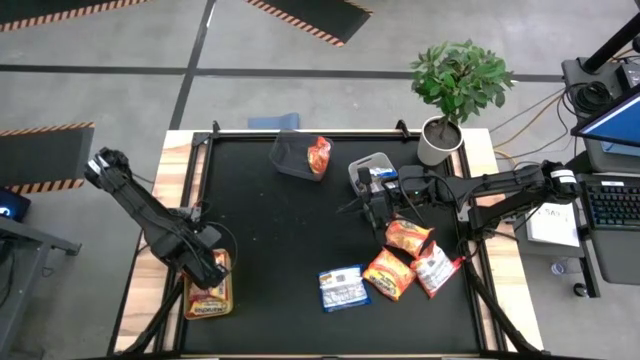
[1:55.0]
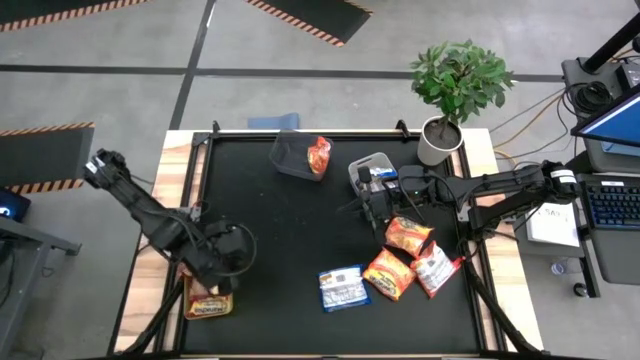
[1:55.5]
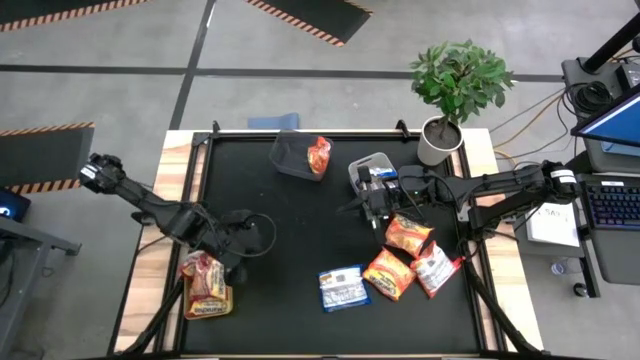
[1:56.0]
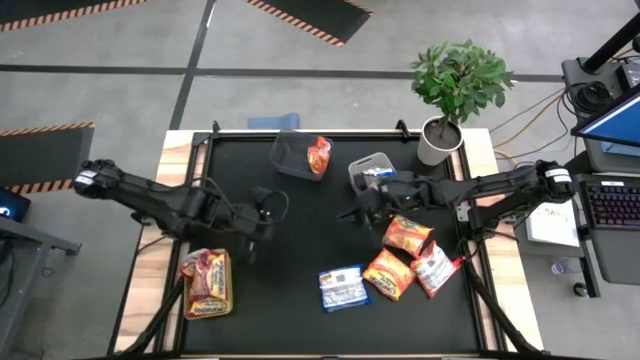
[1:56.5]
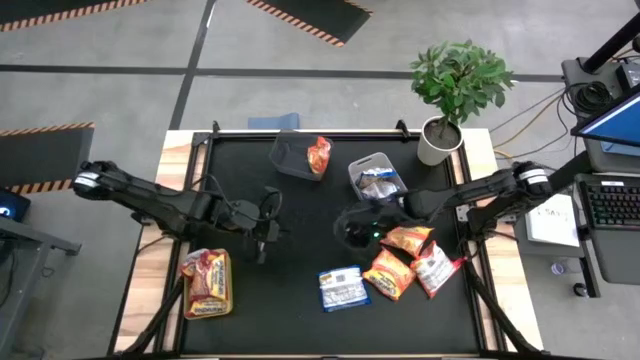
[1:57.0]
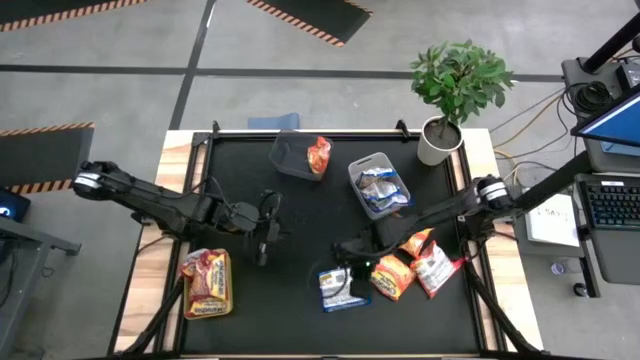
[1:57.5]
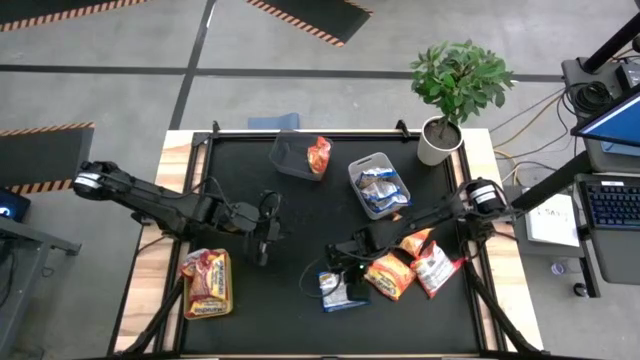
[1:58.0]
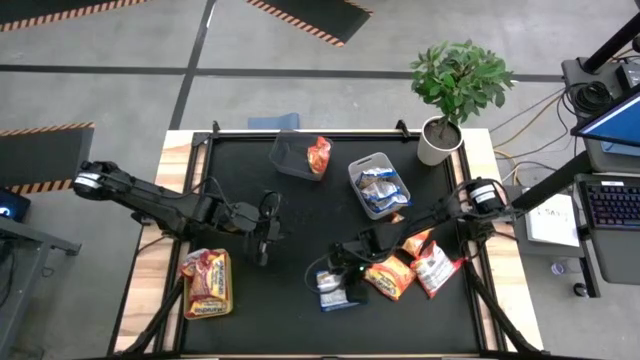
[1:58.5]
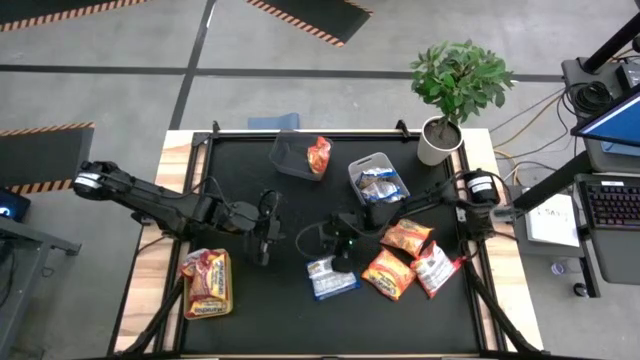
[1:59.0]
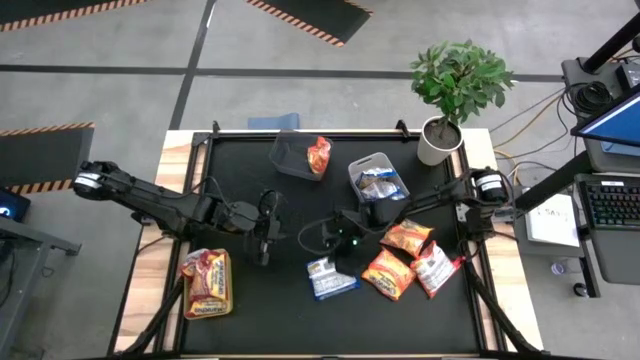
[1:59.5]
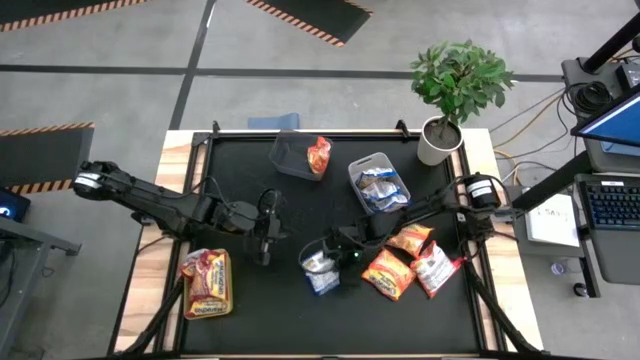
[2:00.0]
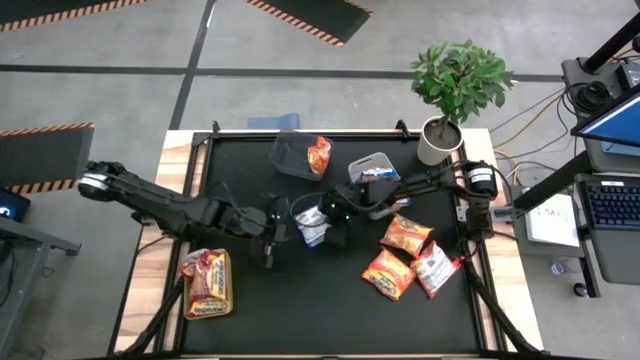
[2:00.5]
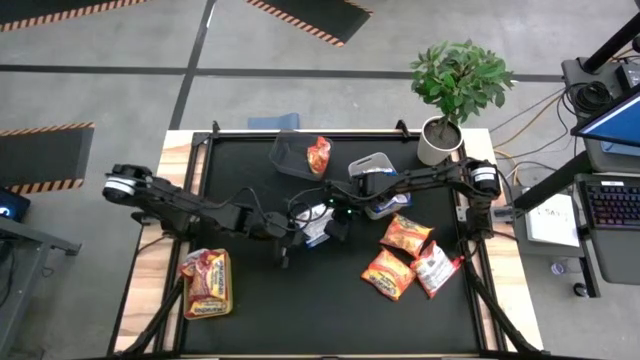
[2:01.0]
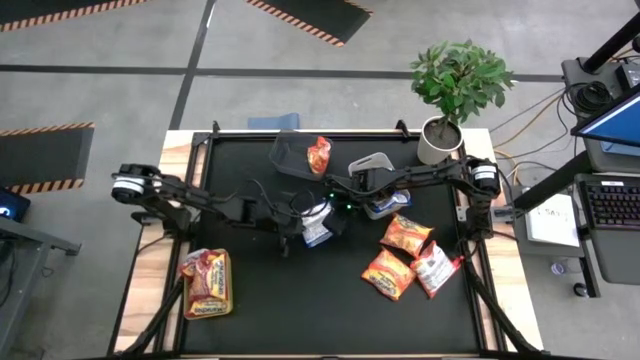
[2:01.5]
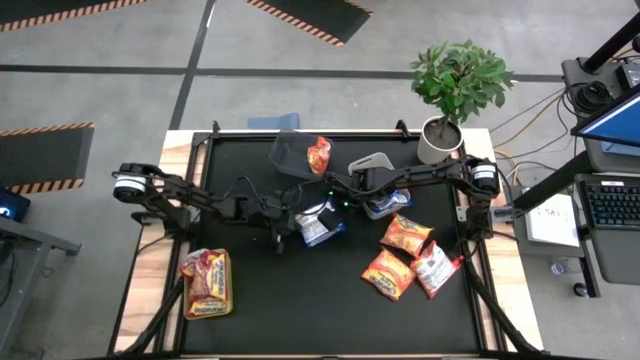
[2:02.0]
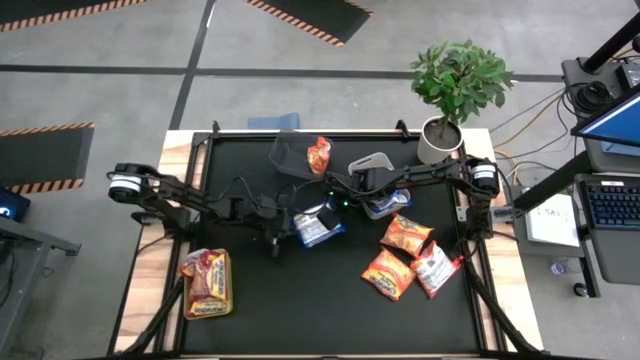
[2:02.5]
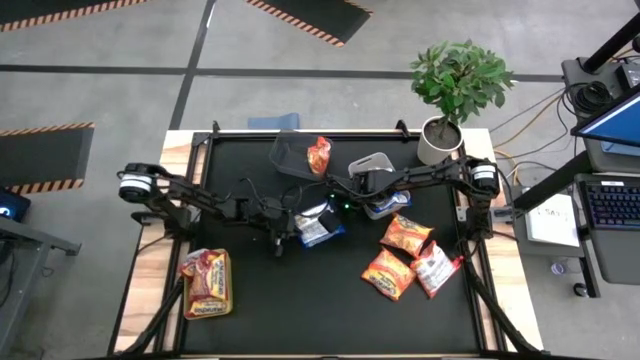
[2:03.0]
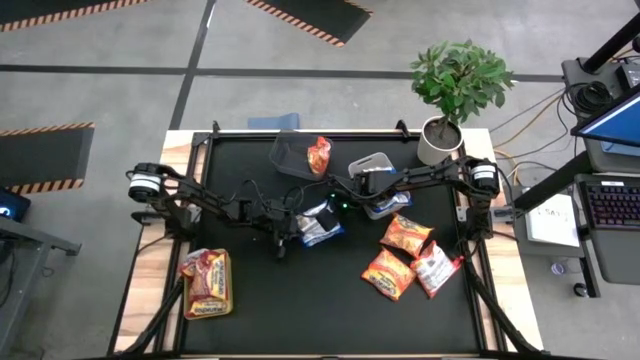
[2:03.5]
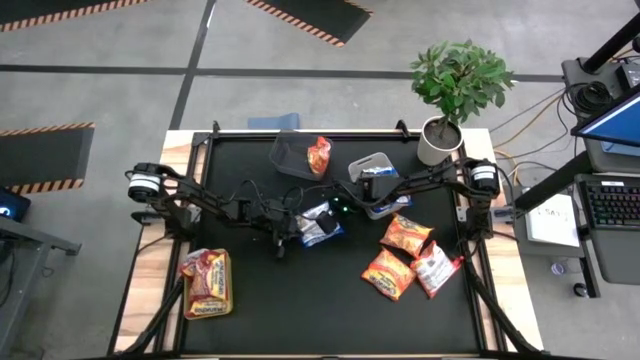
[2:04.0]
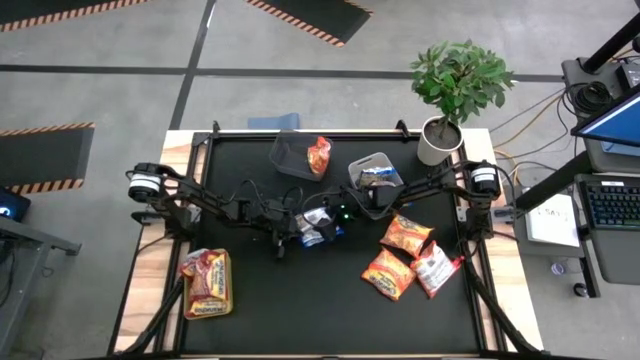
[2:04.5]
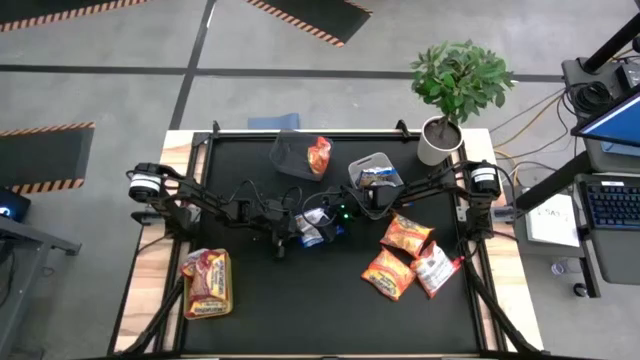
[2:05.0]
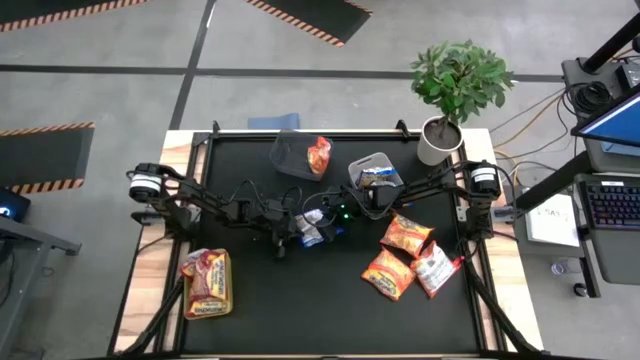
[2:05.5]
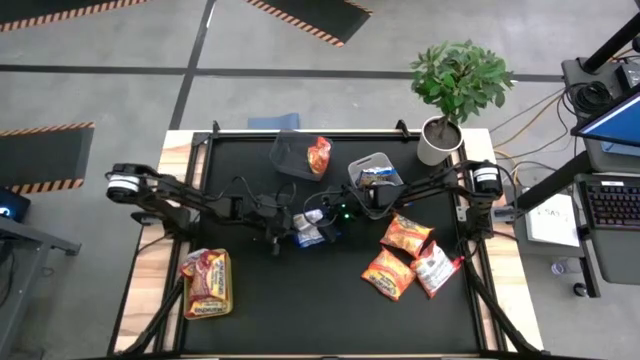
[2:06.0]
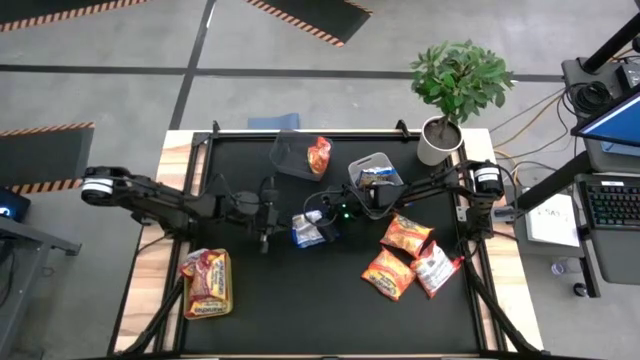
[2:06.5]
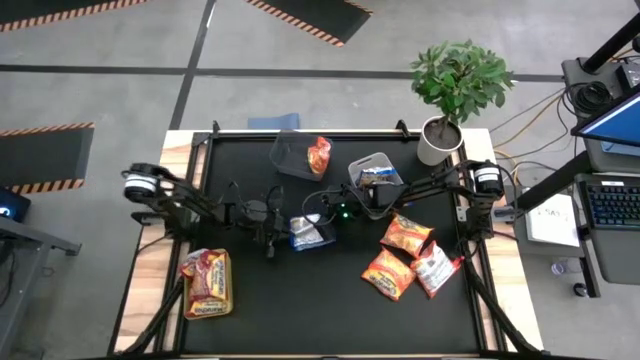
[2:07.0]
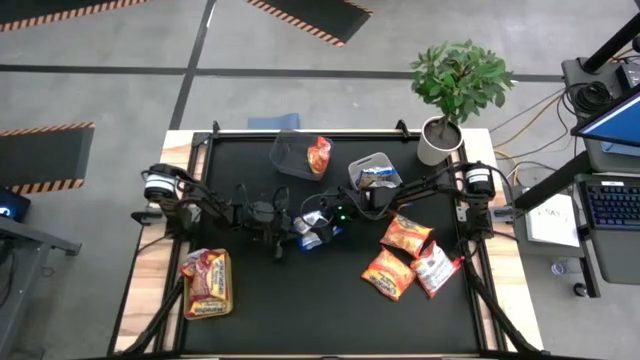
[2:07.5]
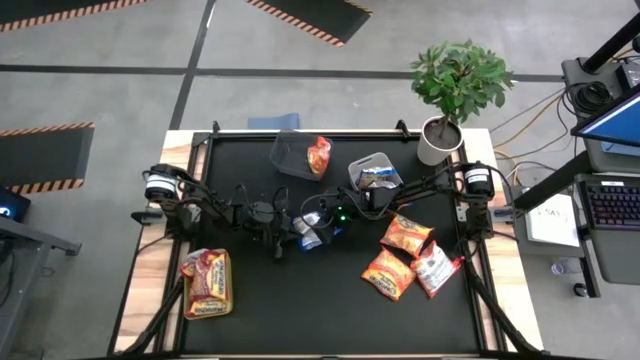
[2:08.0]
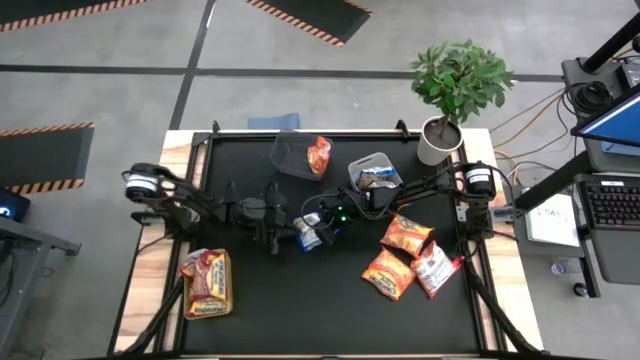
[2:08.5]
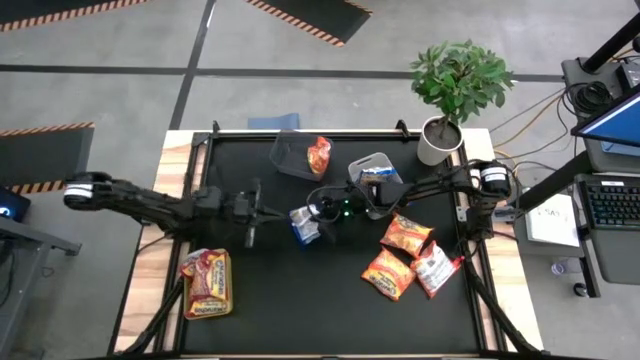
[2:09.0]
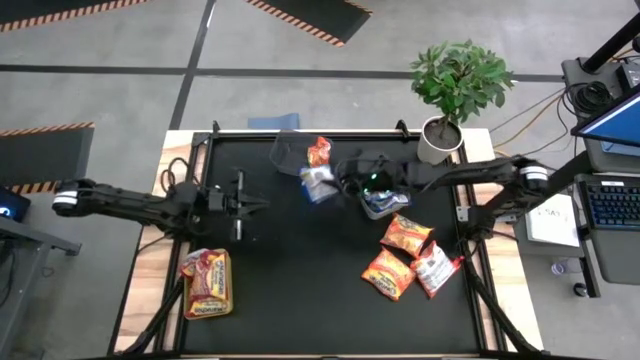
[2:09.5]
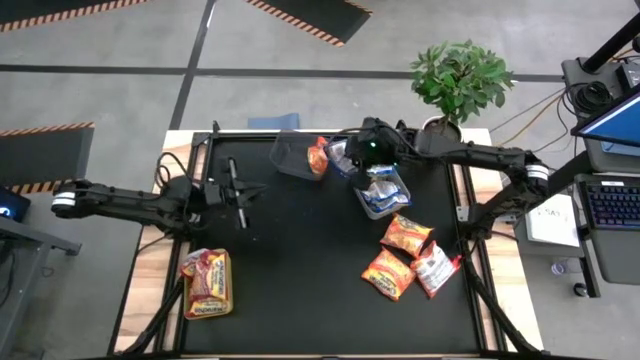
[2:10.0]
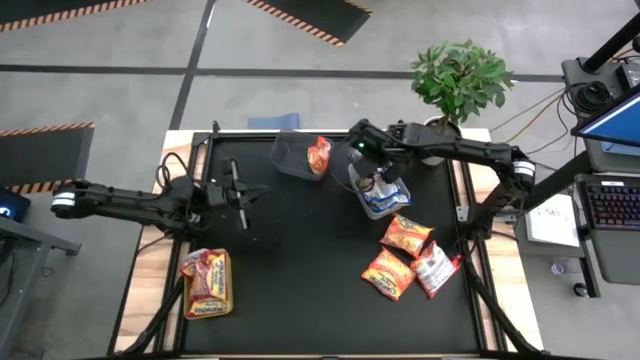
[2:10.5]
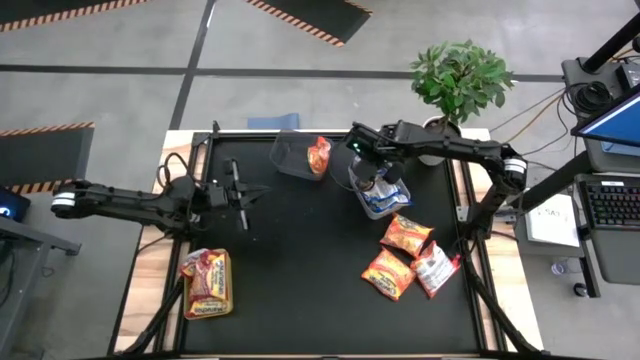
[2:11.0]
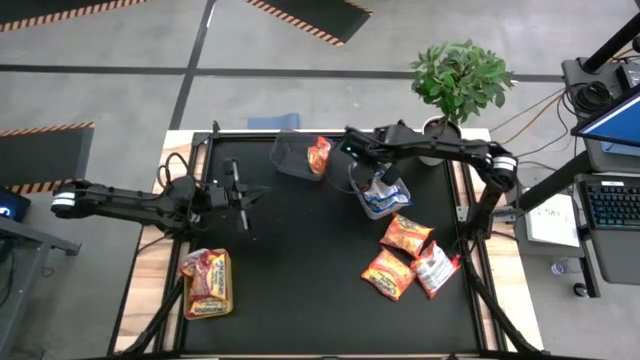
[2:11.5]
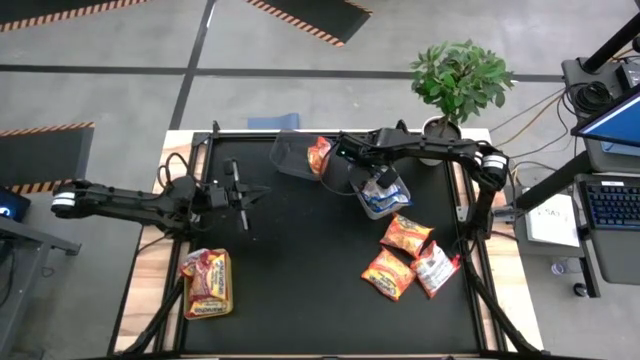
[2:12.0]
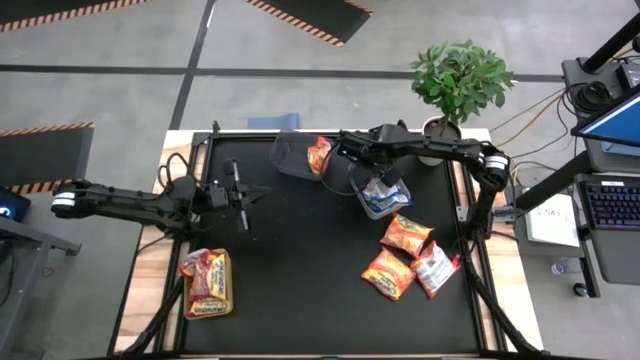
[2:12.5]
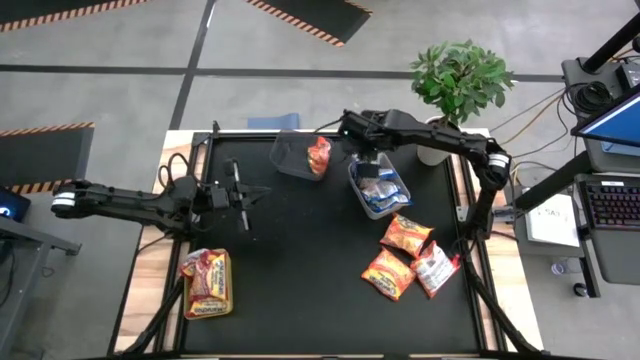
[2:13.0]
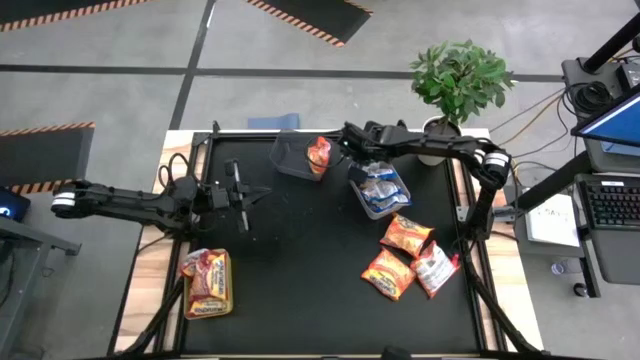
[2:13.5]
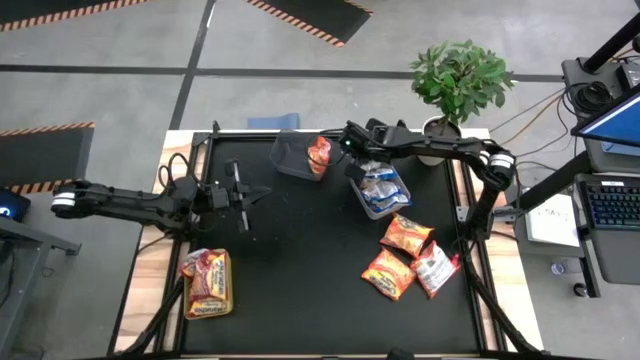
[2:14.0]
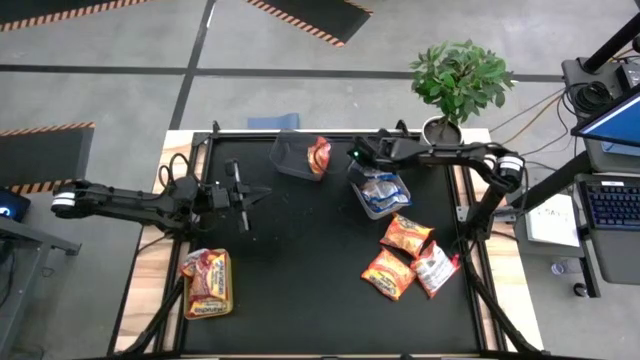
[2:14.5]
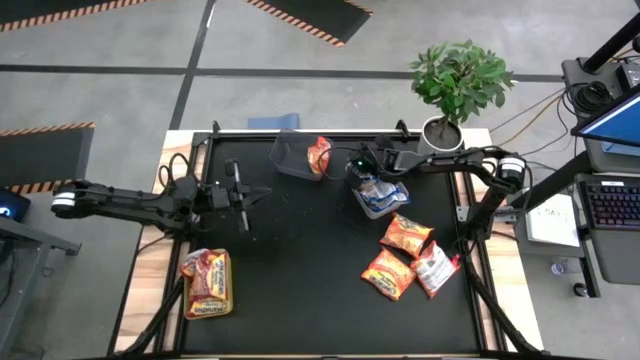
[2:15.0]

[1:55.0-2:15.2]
Task: Sort Maruchan noodles
Put the blue noodle pack into the white bin
